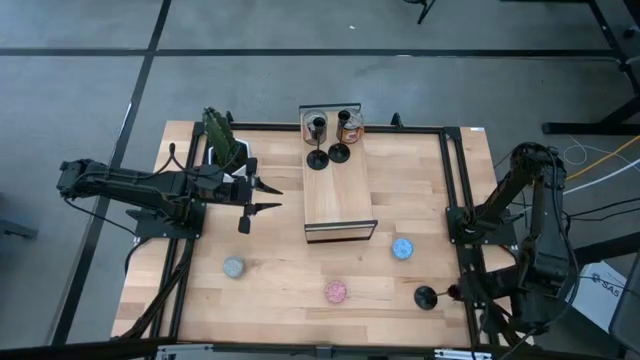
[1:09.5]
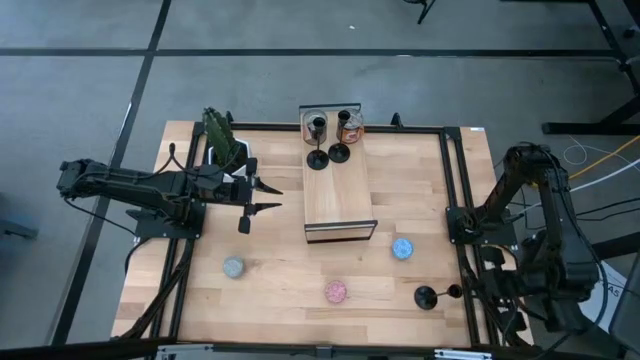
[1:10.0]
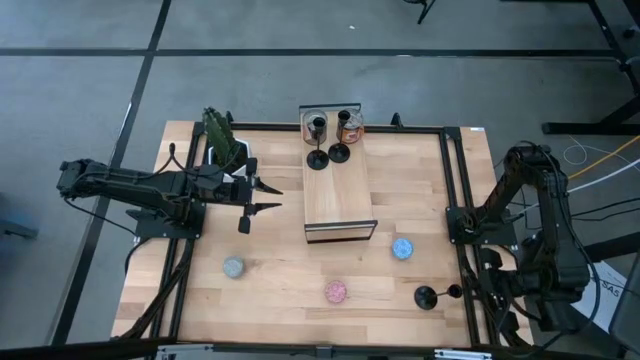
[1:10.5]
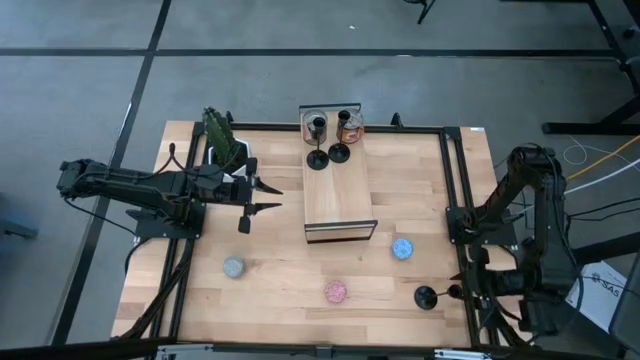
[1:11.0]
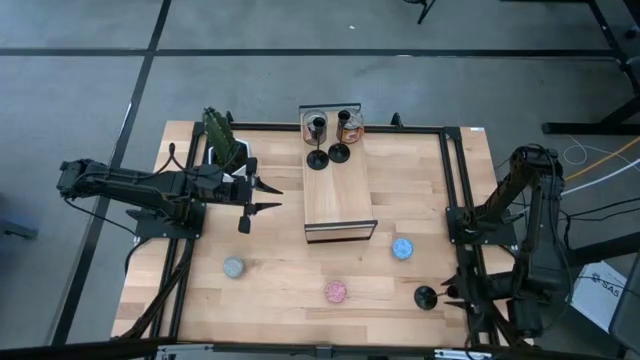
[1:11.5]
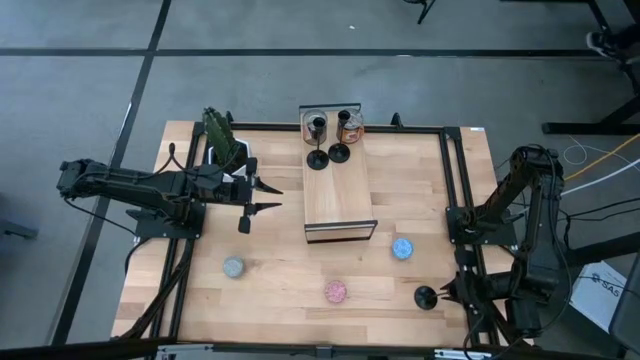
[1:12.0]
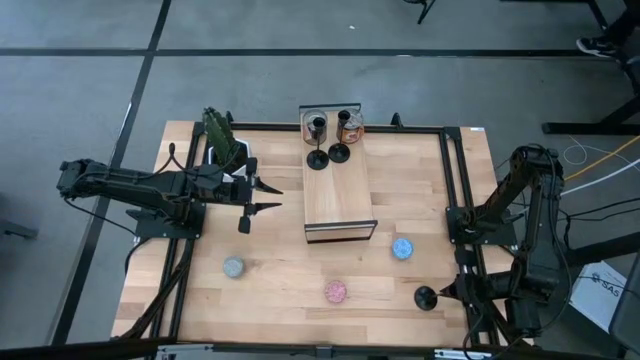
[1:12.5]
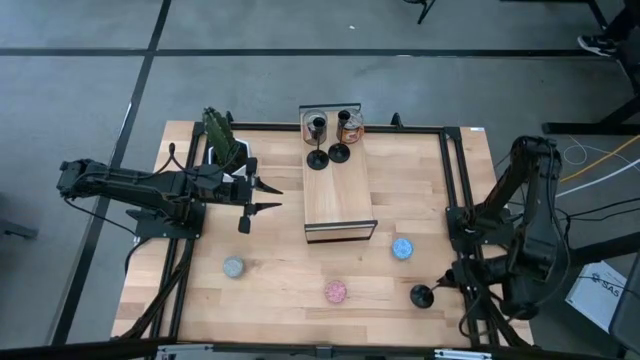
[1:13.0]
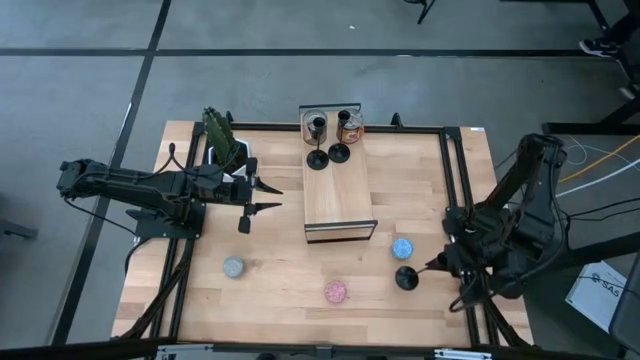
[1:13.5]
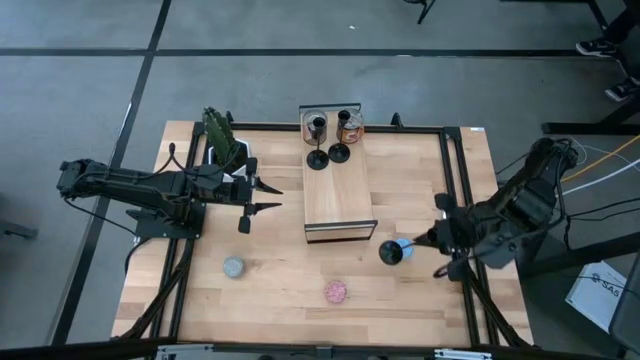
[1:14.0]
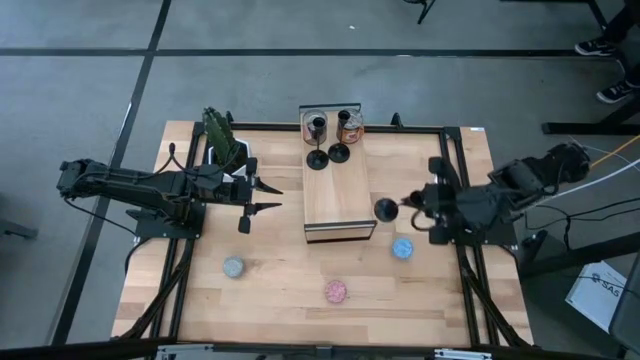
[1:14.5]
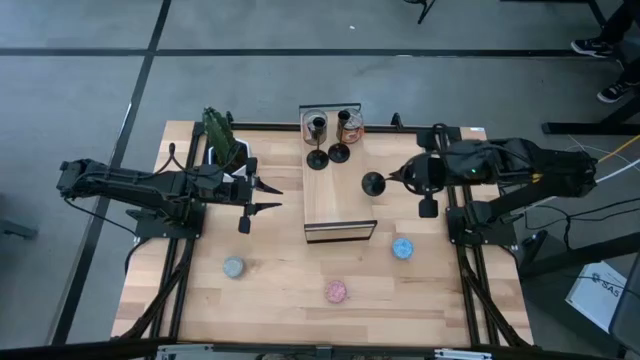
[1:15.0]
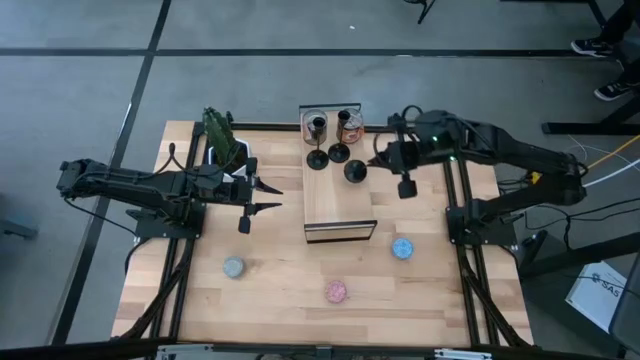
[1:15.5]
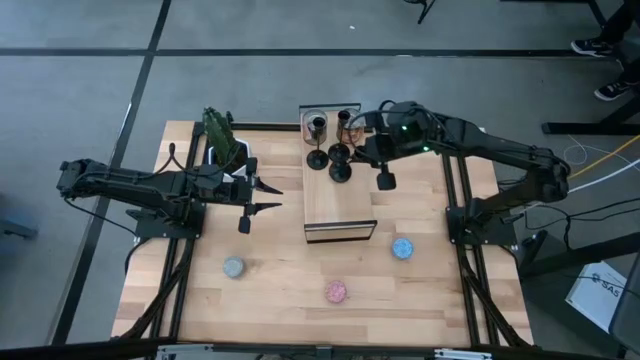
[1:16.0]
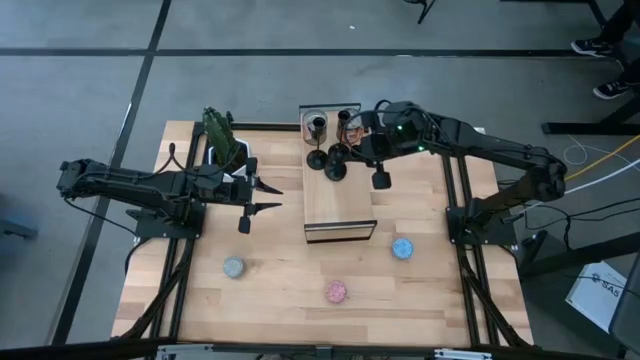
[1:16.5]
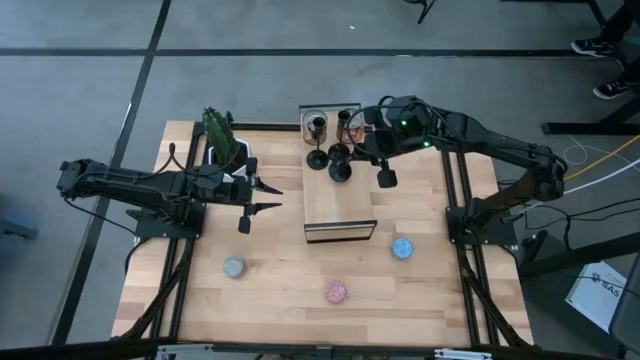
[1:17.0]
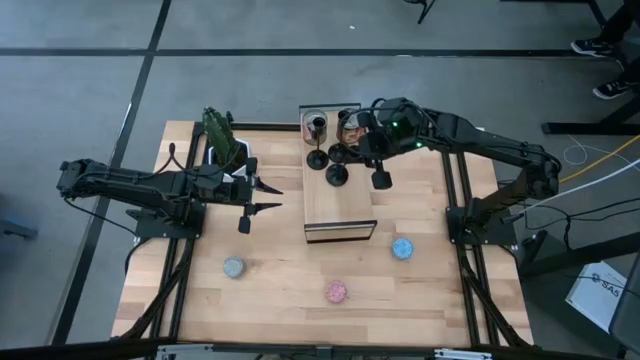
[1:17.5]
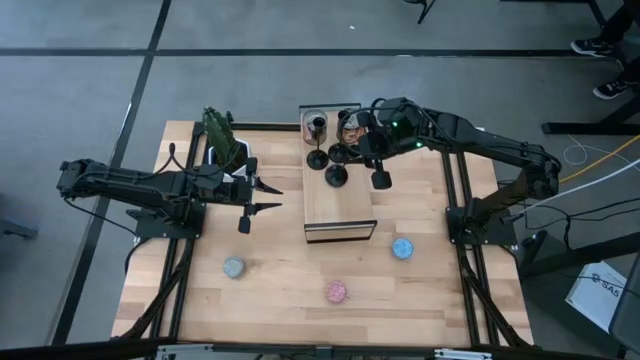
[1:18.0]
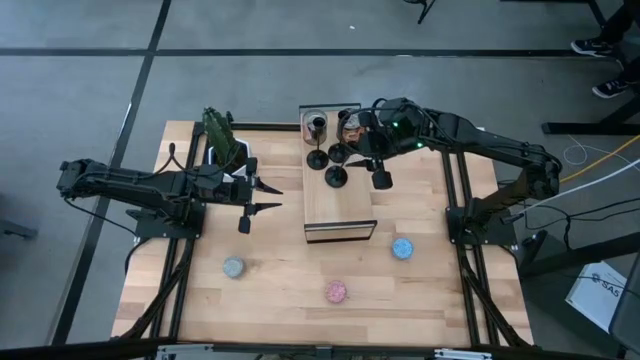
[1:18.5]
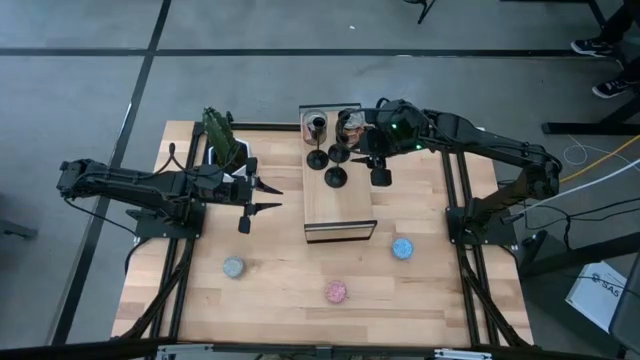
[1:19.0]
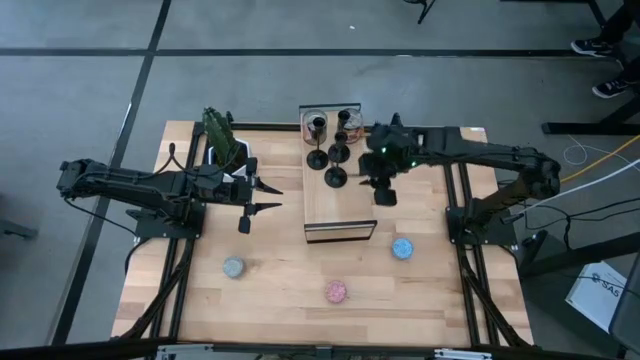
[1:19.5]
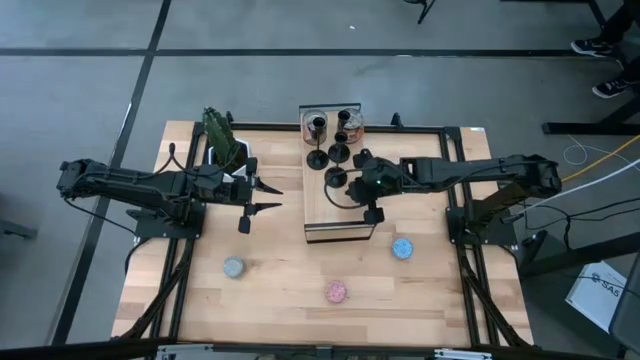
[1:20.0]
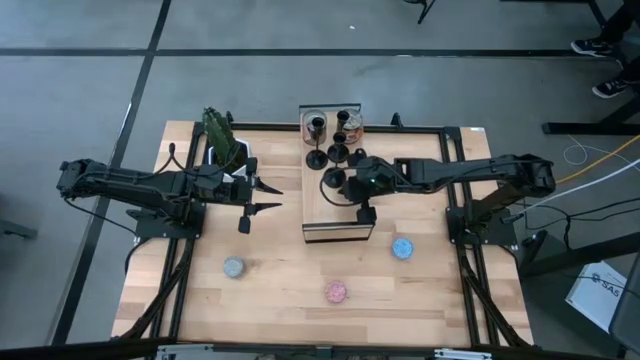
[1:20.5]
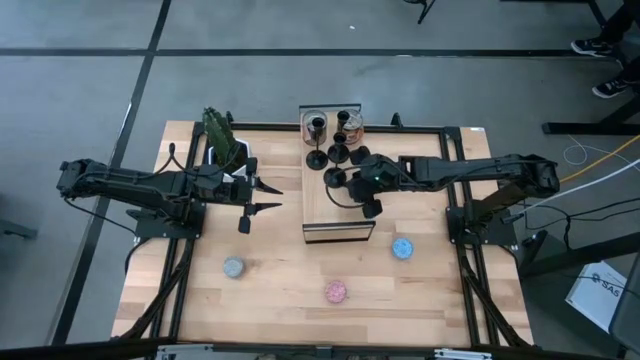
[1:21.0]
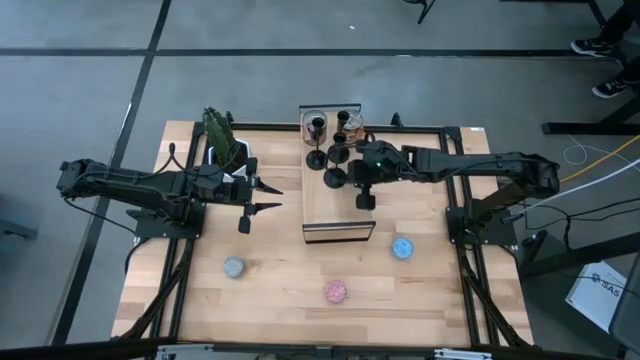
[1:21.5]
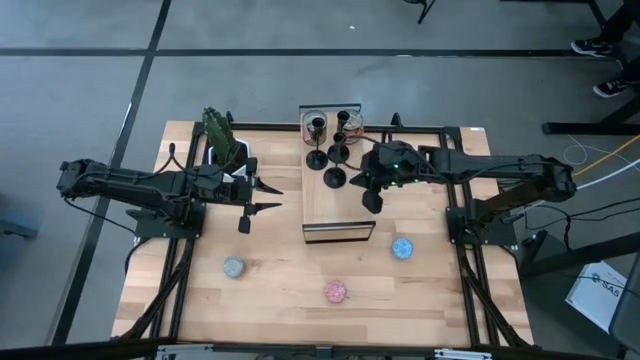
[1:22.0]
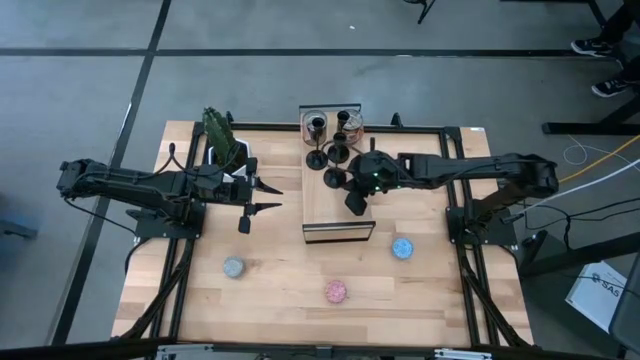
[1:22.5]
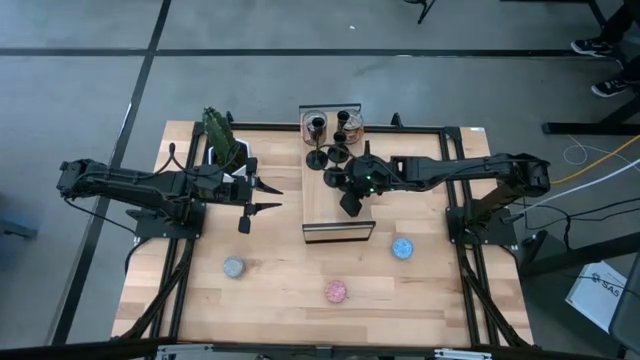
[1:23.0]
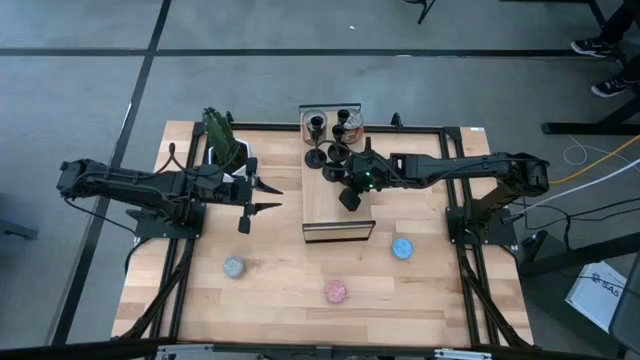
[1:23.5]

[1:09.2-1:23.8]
Task: Pick & Place candle stick holders
Put the candle holder on the shelf

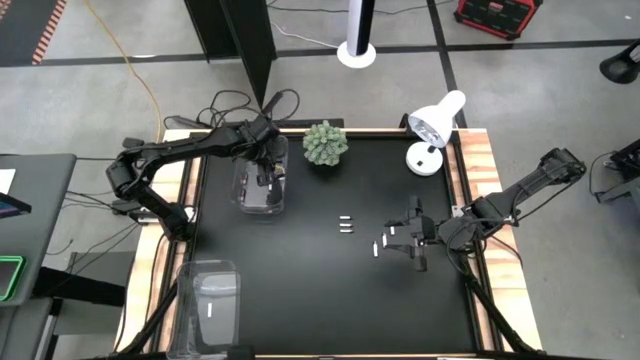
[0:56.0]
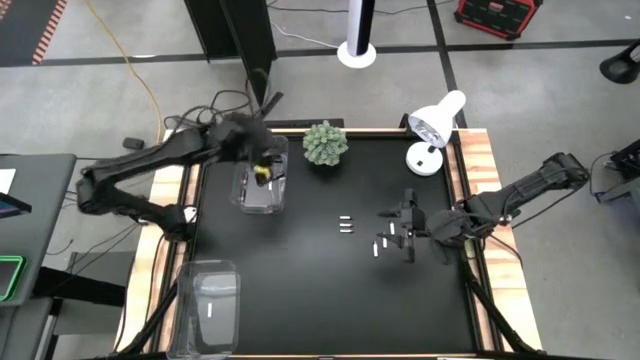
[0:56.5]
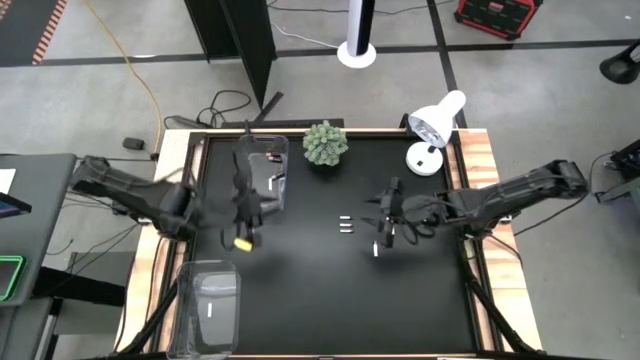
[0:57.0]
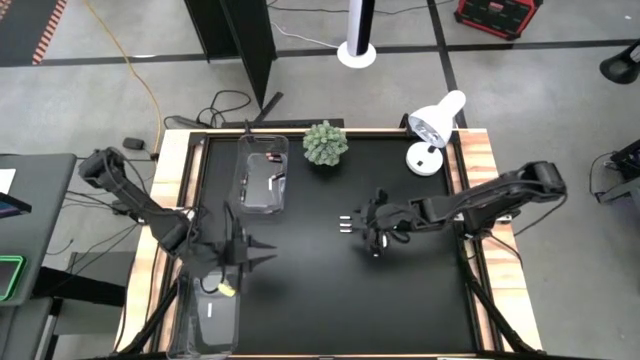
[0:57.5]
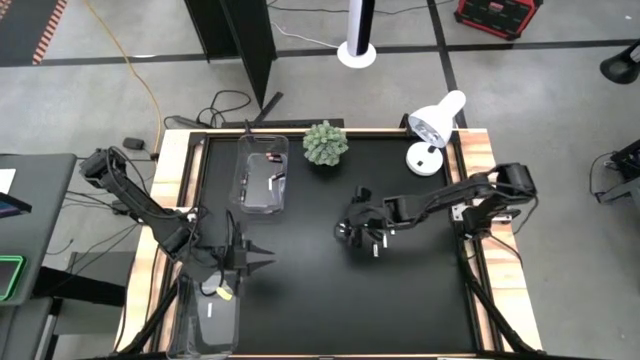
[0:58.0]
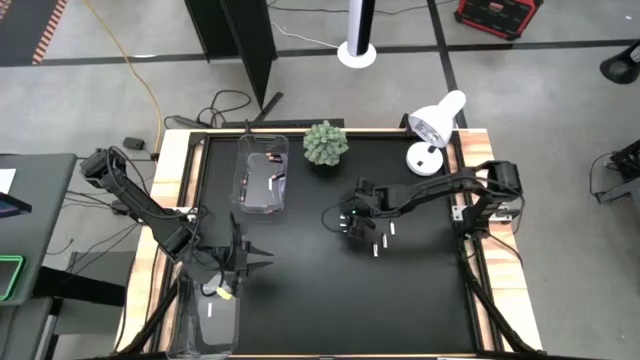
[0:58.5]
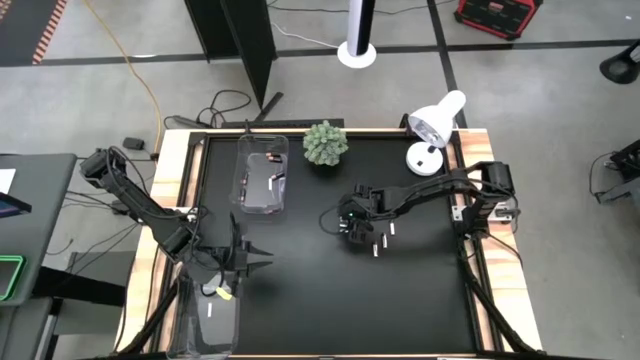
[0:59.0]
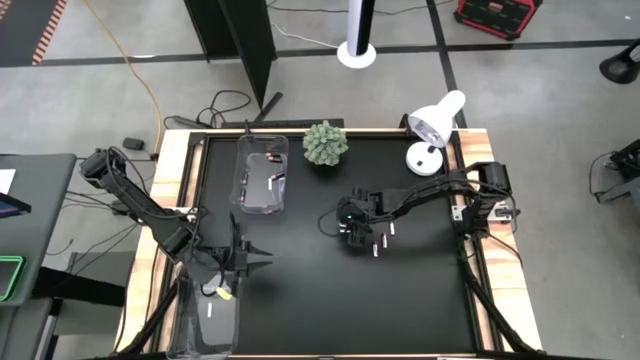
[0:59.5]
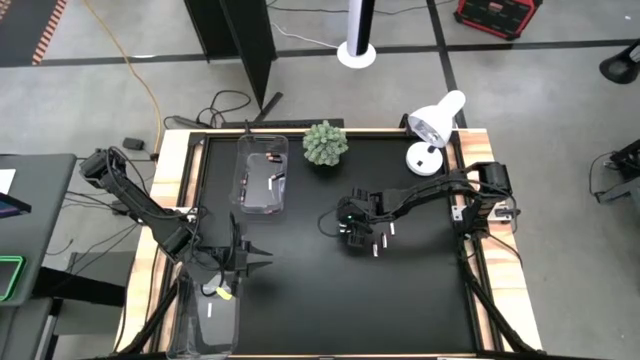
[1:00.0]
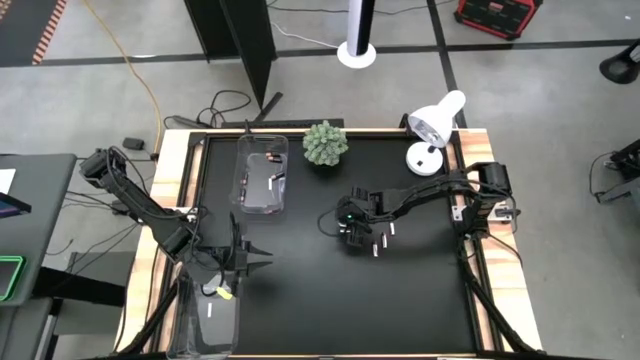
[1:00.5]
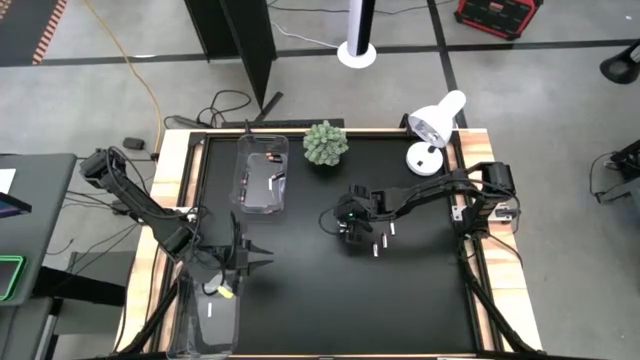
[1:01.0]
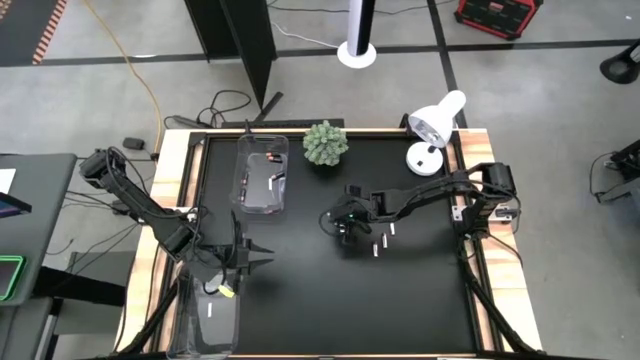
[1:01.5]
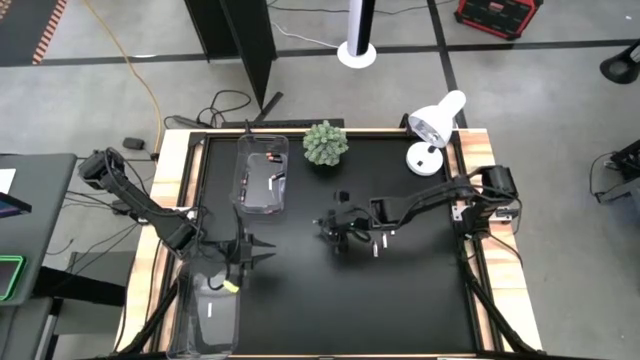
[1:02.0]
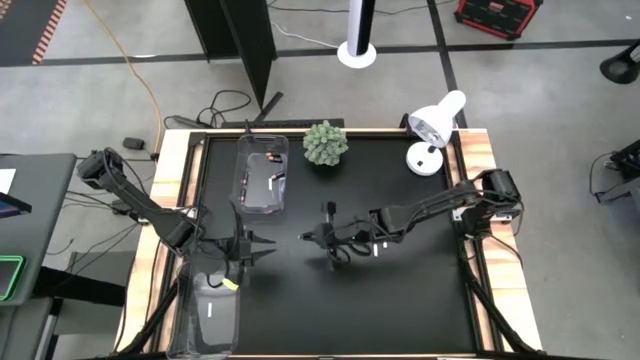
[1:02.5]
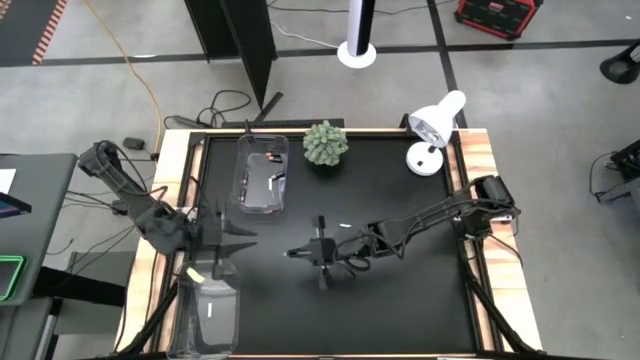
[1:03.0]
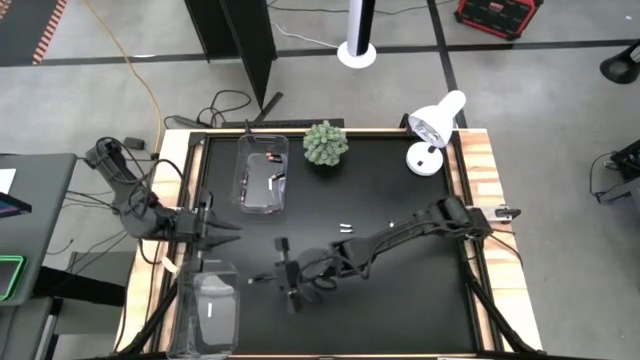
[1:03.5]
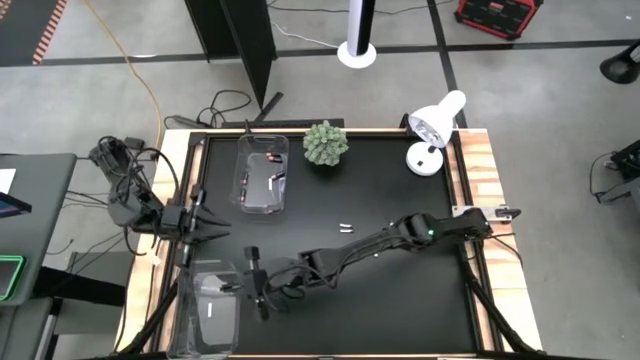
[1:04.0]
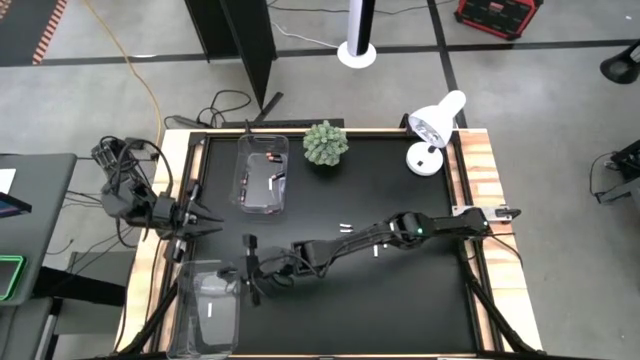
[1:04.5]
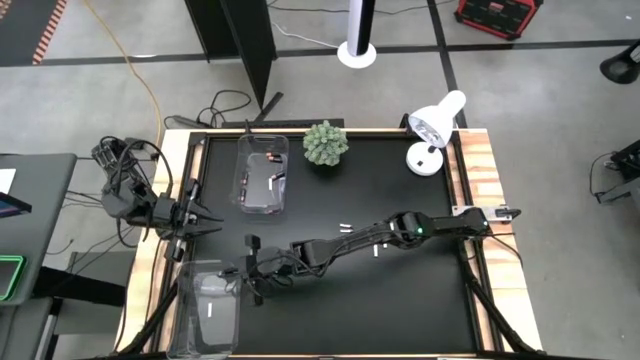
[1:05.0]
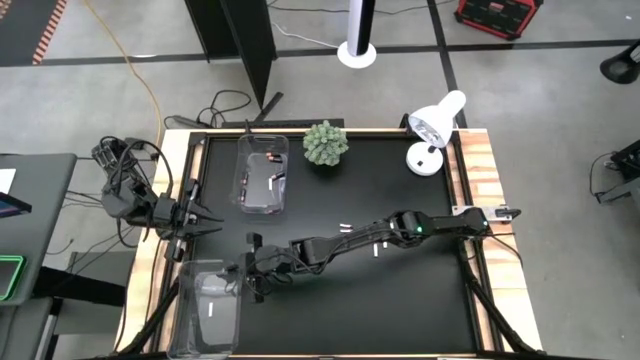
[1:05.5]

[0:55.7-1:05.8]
Task: Sort batteries
Put the silver and black battery into the bottom transparent bin
